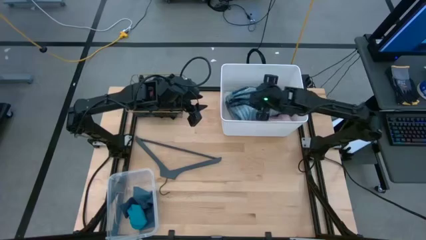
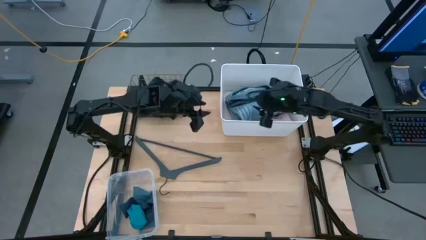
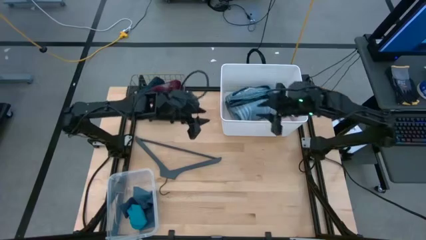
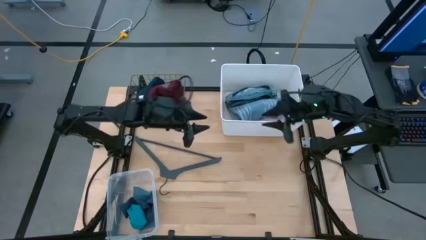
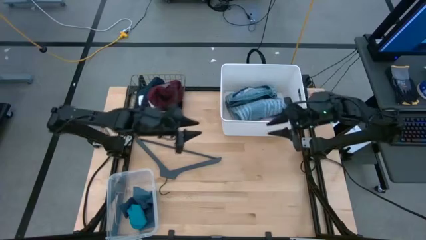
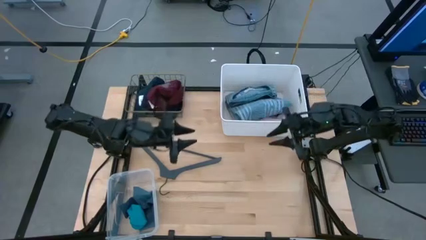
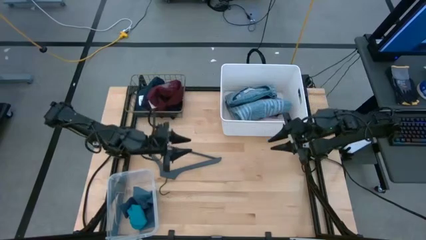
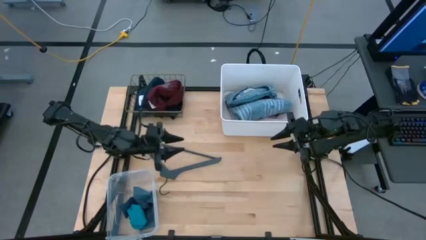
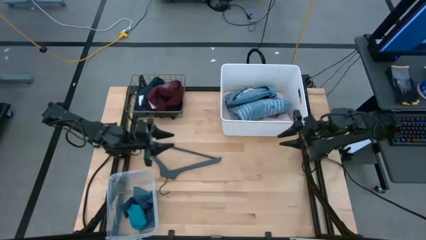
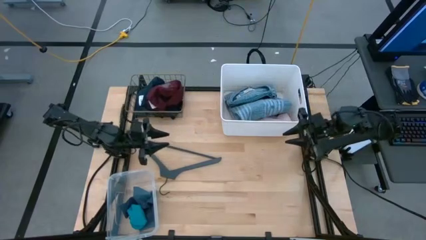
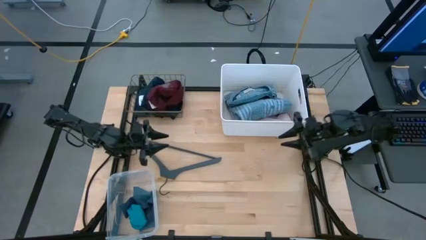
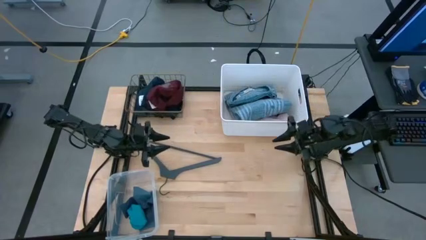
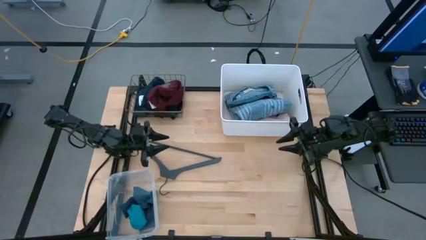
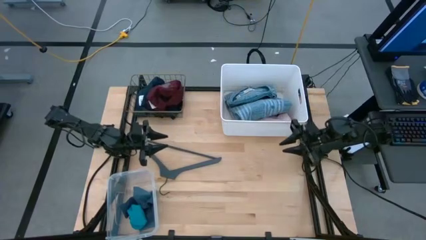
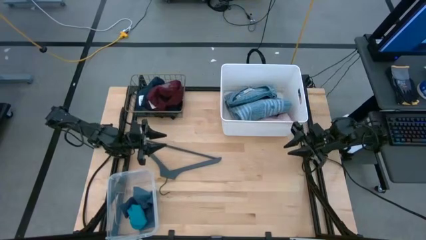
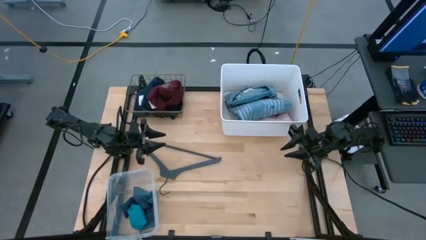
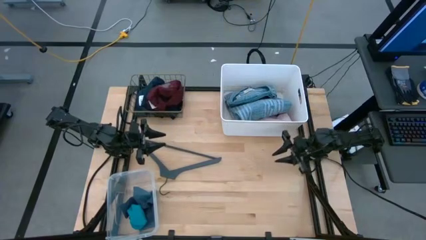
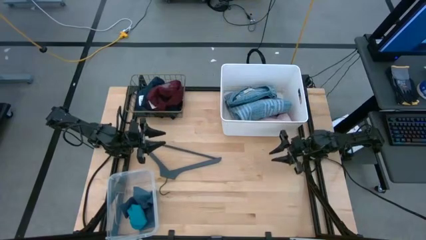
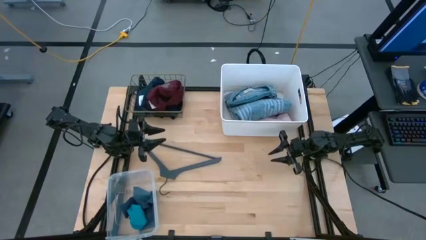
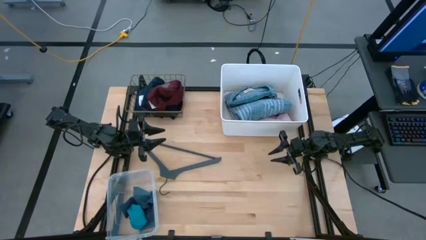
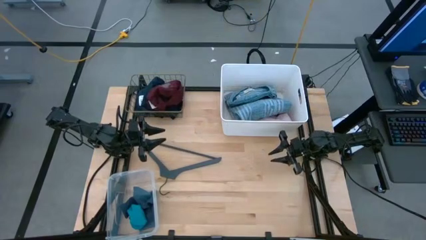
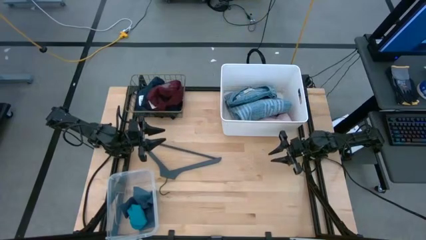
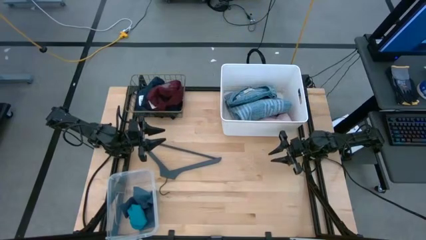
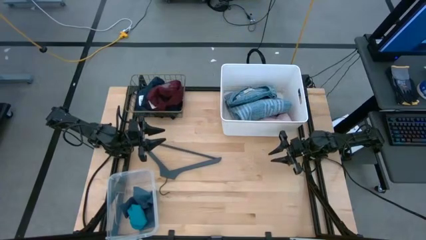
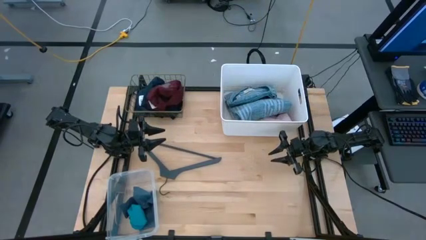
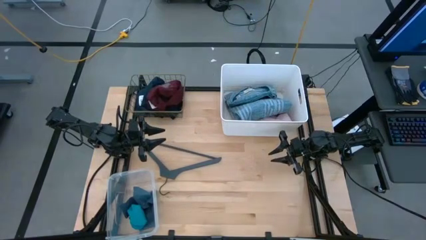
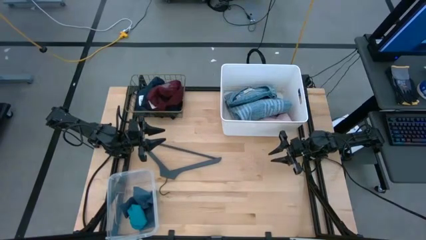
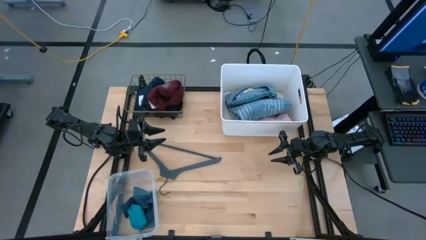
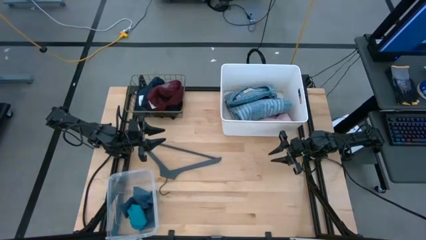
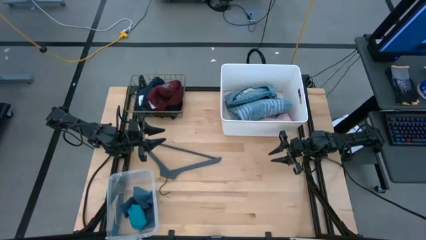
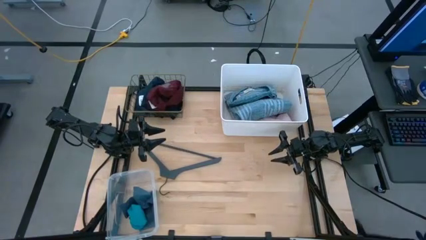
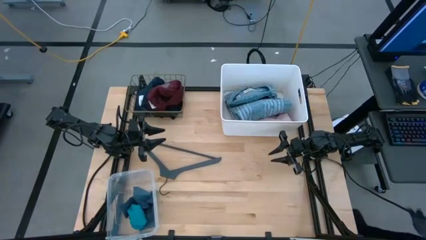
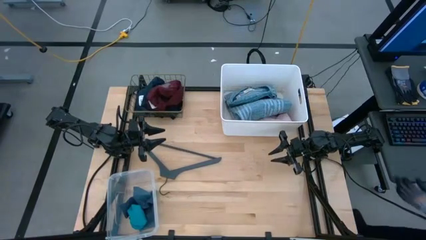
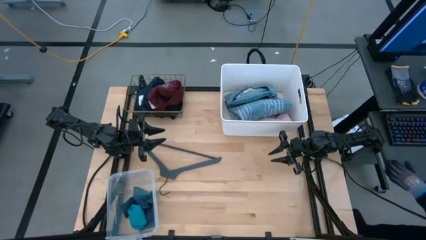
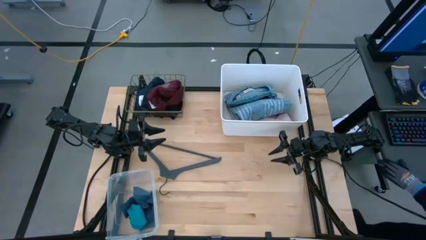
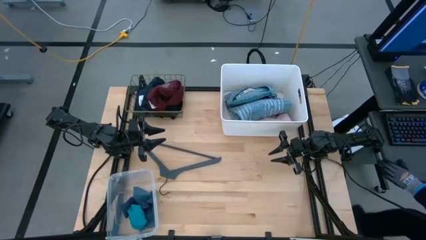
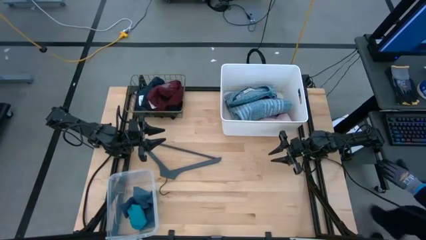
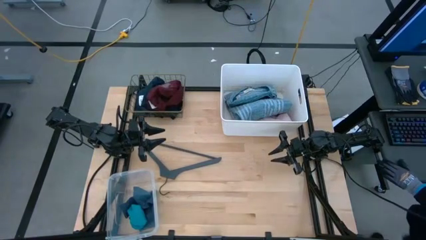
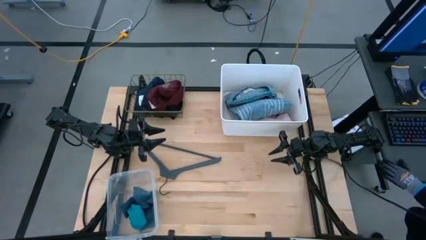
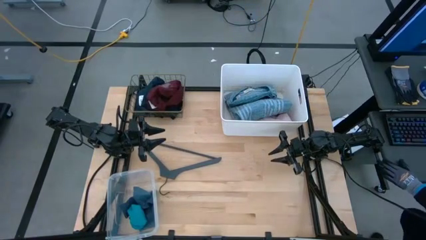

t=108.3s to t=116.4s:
Task: Pick & Place Cloths
Return to Home Position

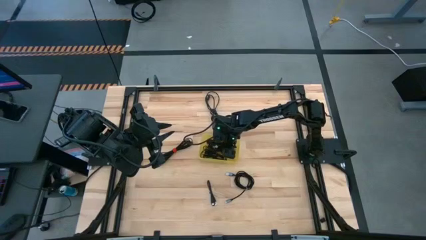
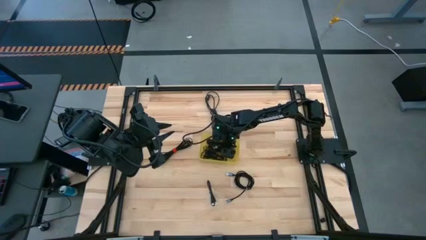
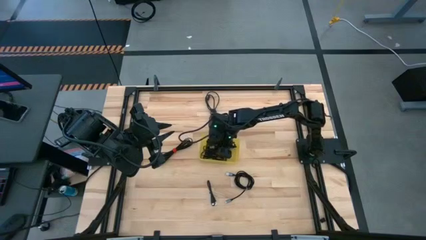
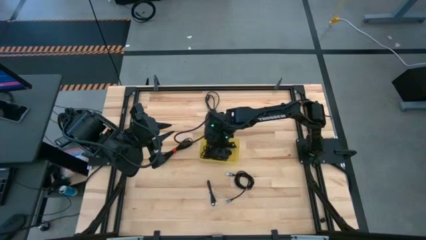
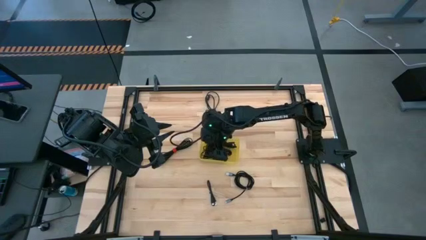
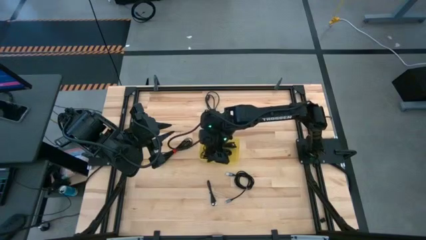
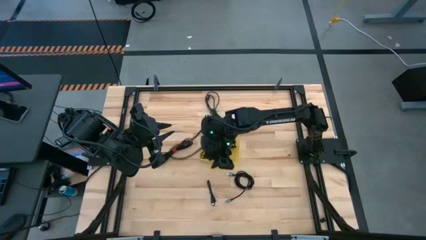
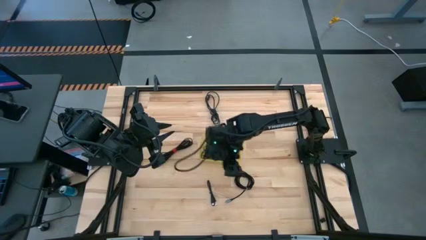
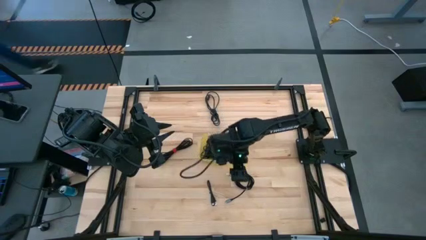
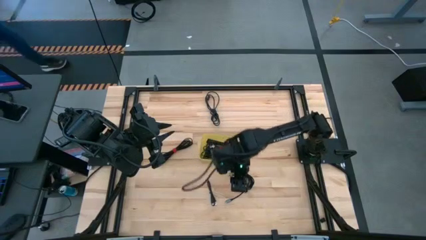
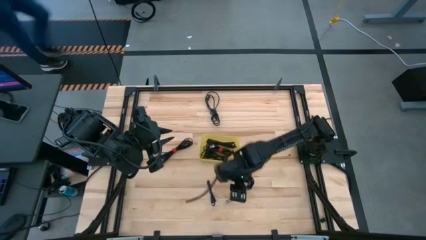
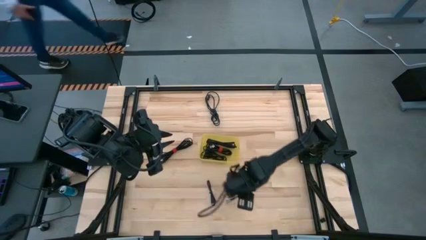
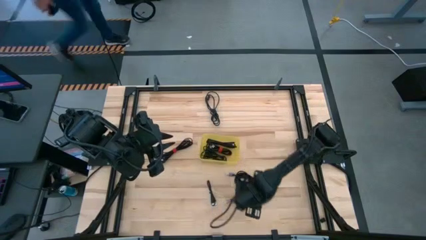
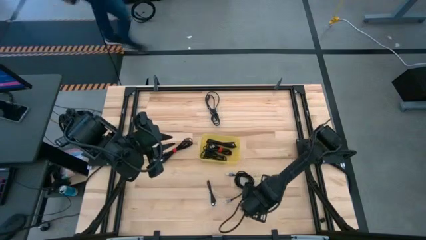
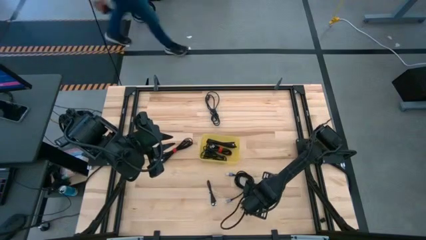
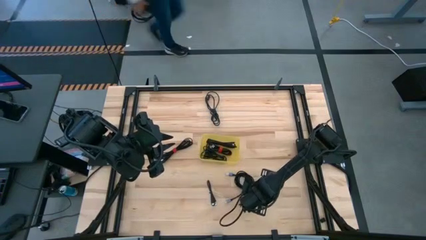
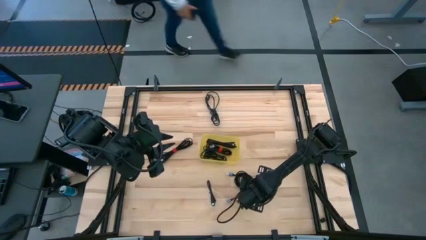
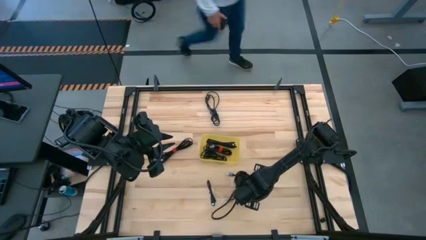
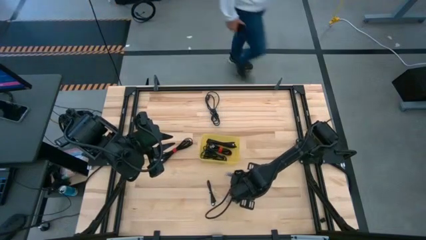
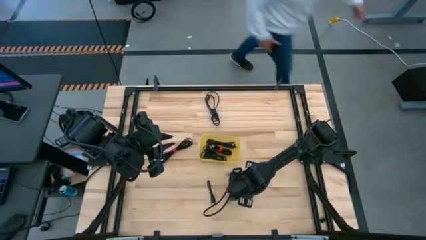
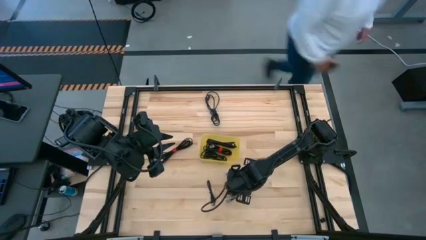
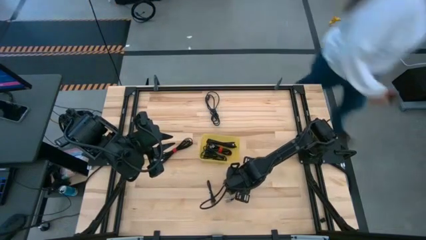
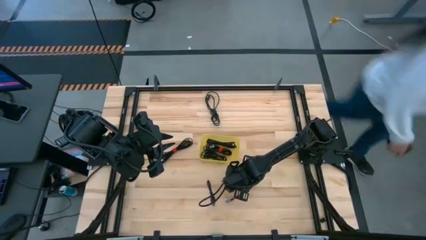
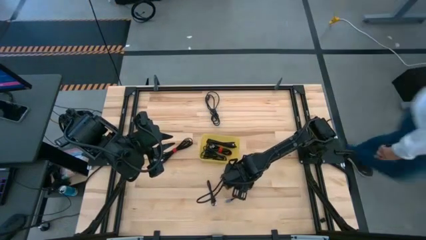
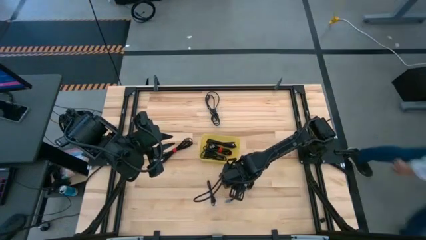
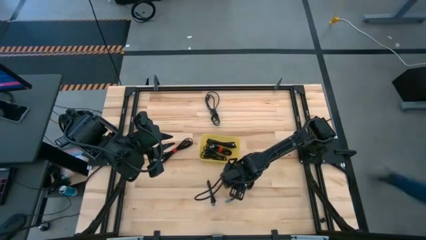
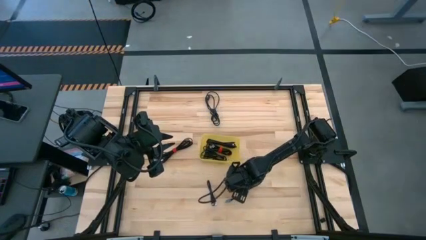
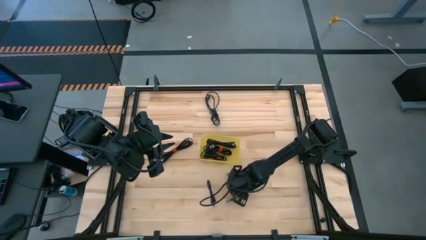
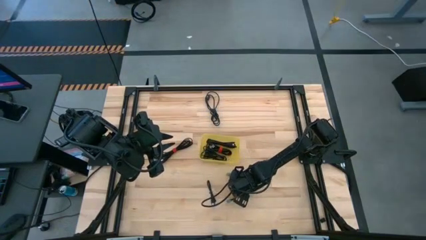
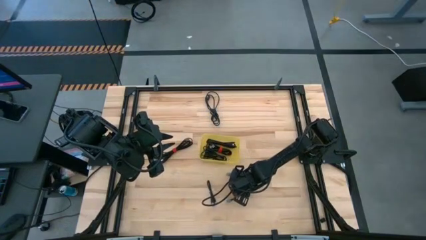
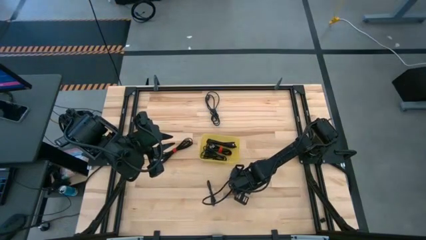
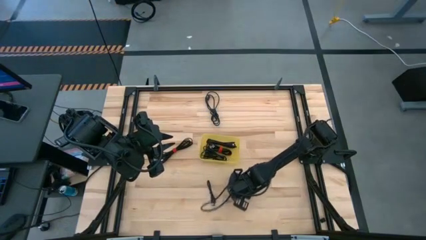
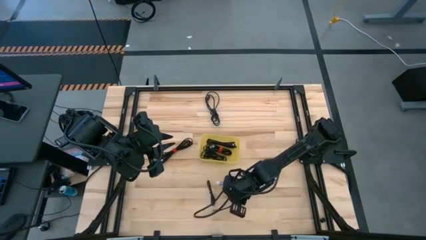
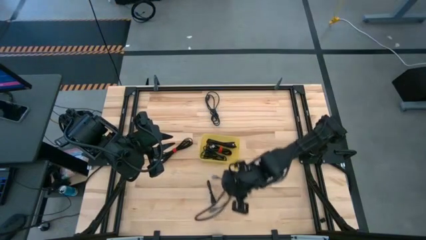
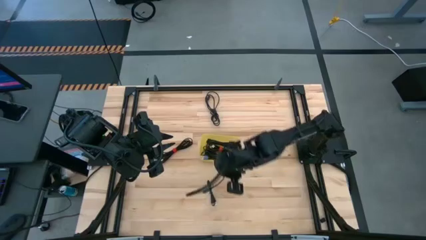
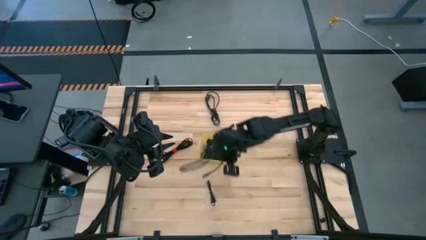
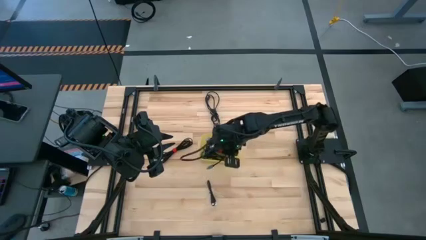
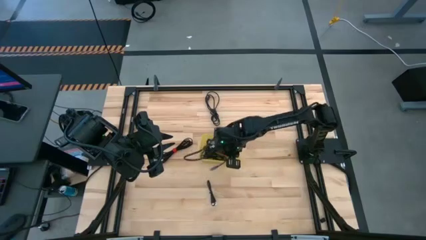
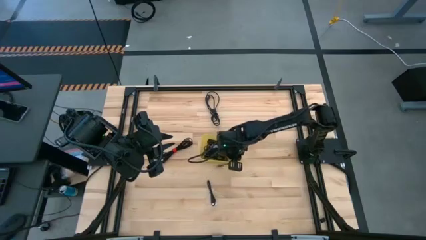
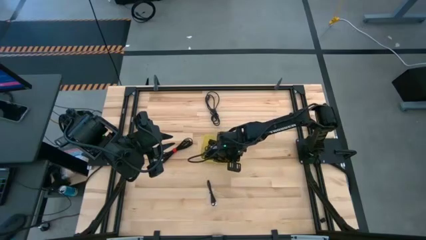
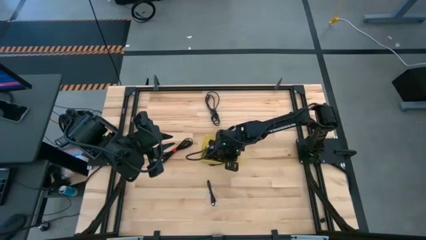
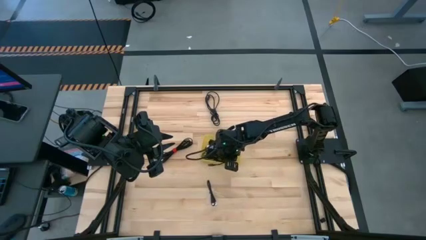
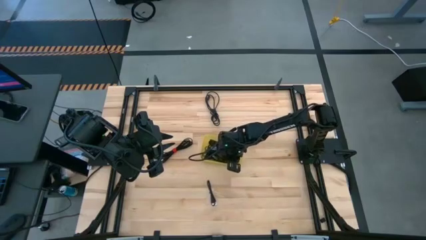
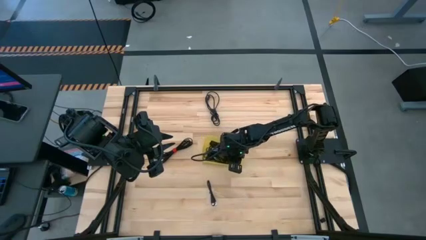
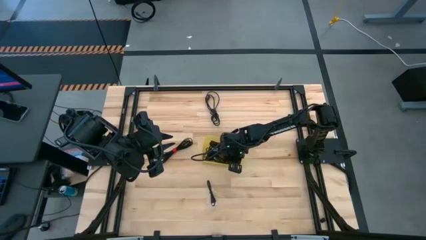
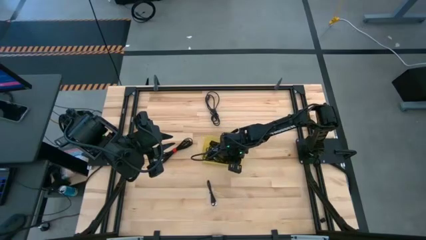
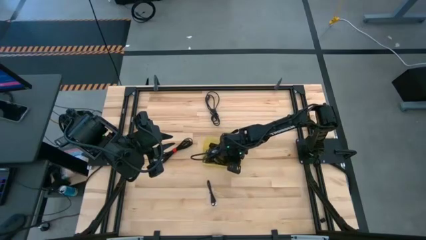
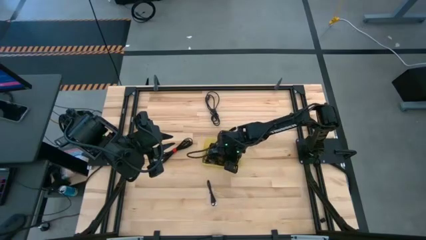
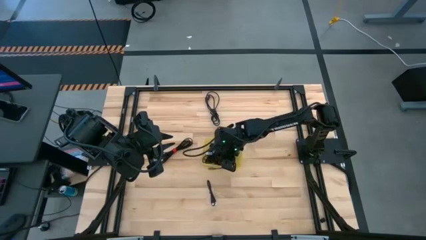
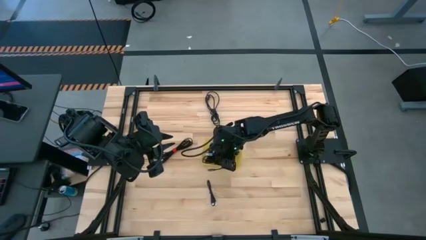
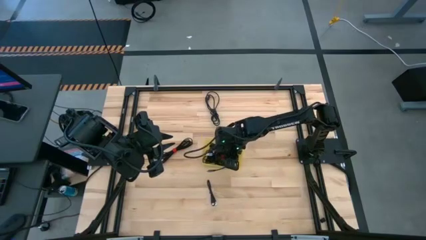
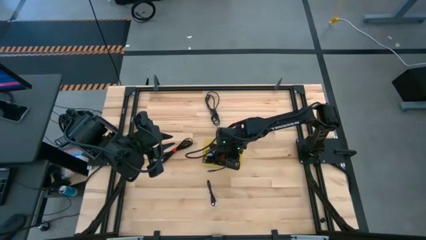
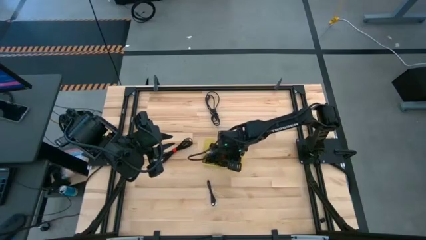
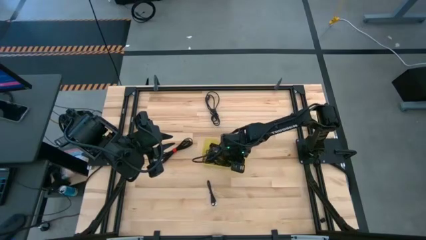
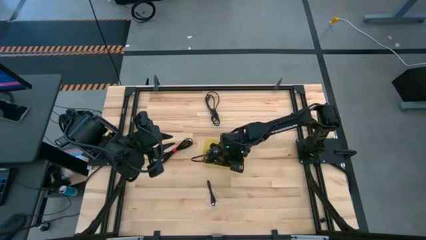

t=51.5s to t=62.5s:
Task: Pick and place USB-C Cables
Put the black charger cable into the yellow bin
